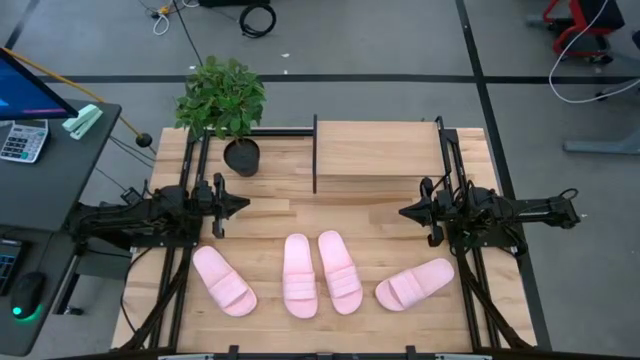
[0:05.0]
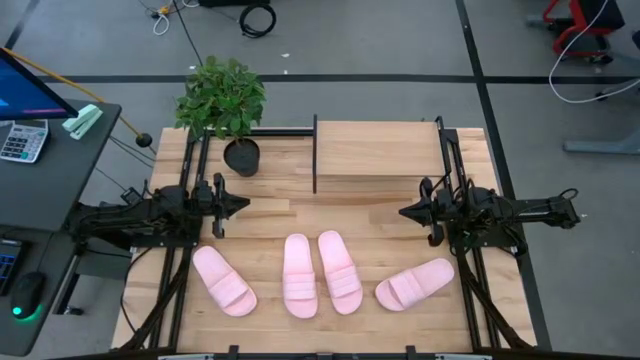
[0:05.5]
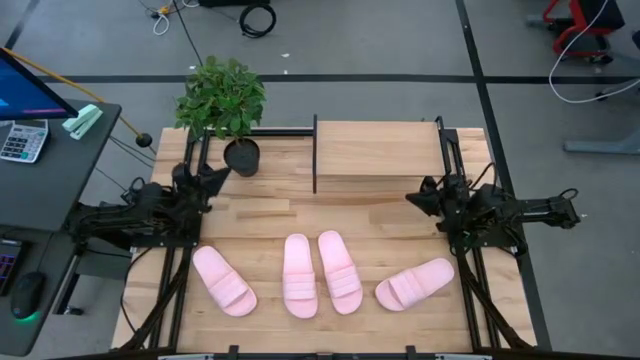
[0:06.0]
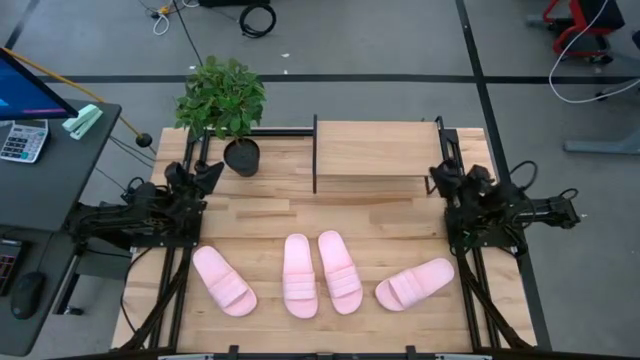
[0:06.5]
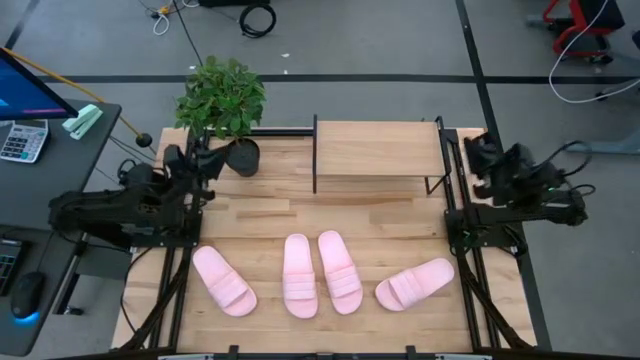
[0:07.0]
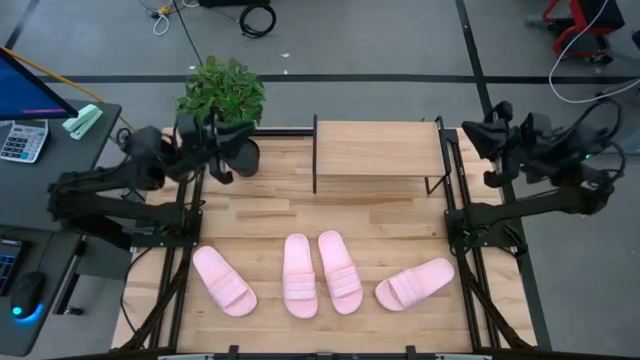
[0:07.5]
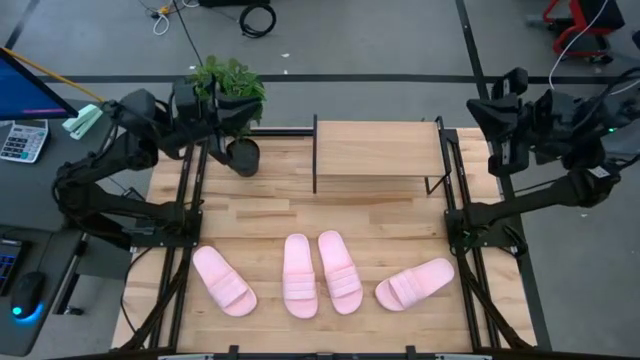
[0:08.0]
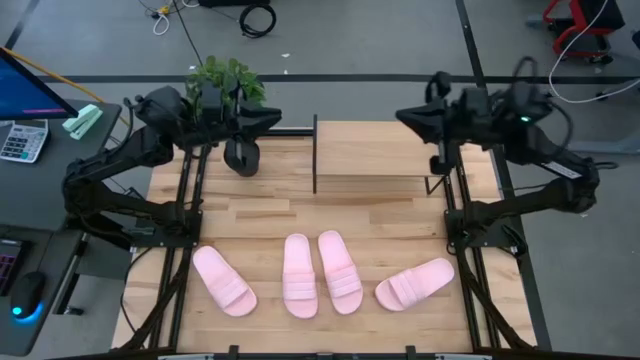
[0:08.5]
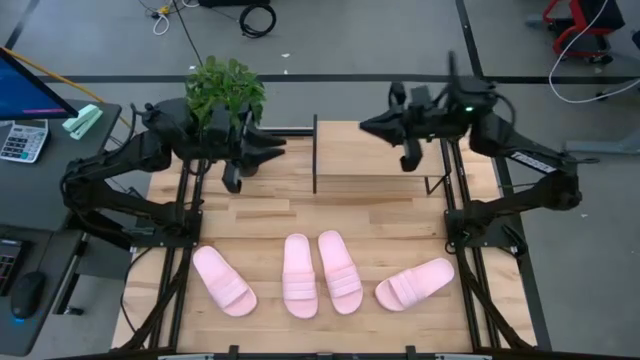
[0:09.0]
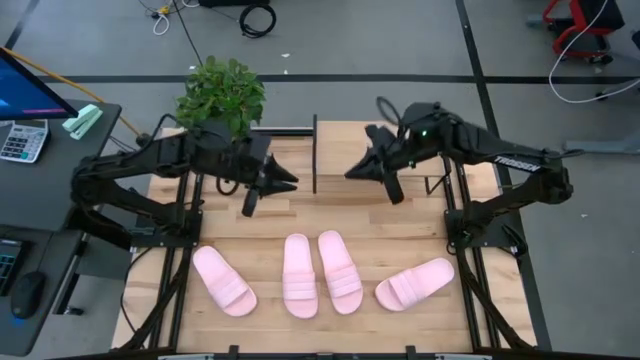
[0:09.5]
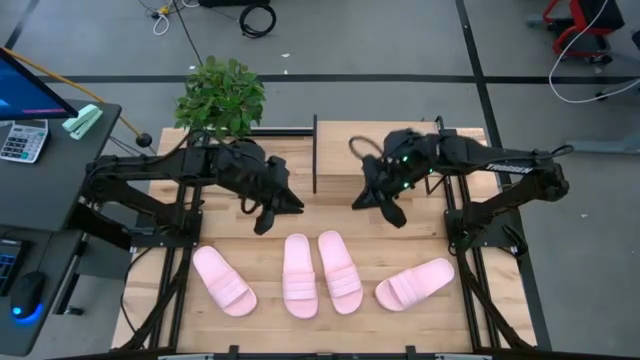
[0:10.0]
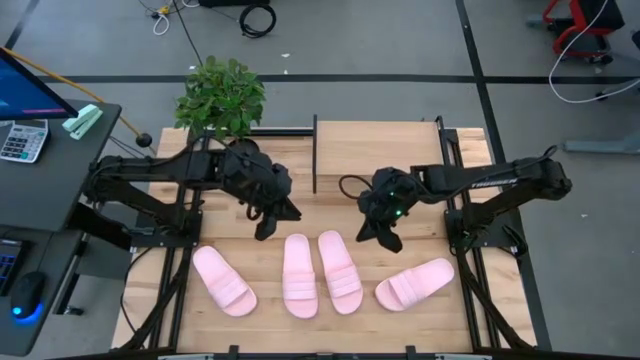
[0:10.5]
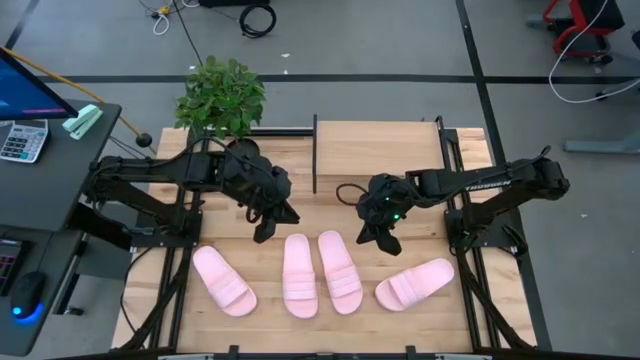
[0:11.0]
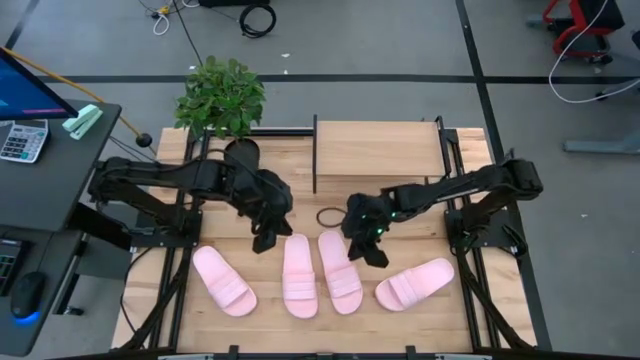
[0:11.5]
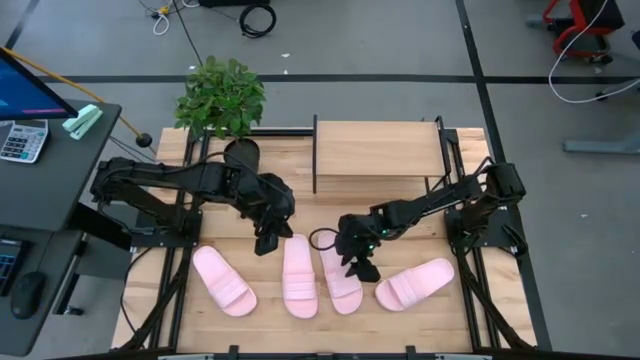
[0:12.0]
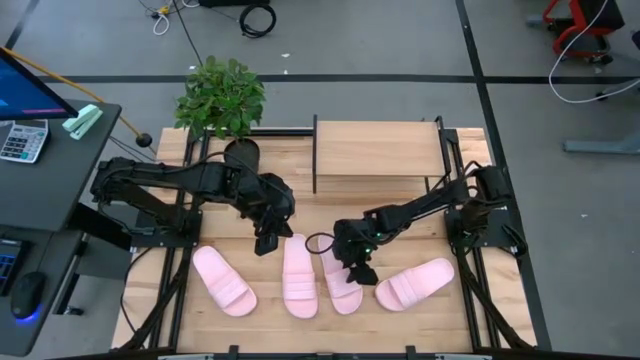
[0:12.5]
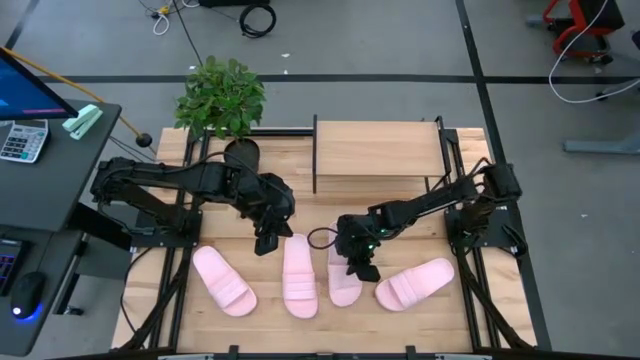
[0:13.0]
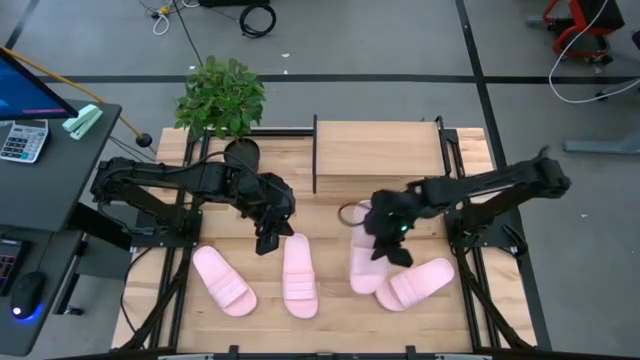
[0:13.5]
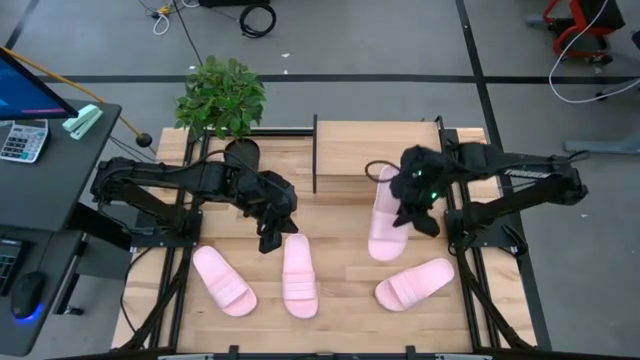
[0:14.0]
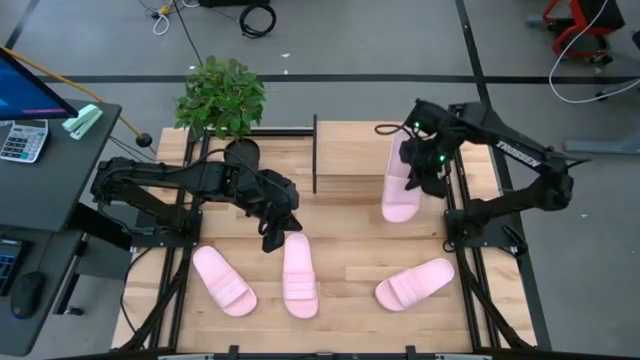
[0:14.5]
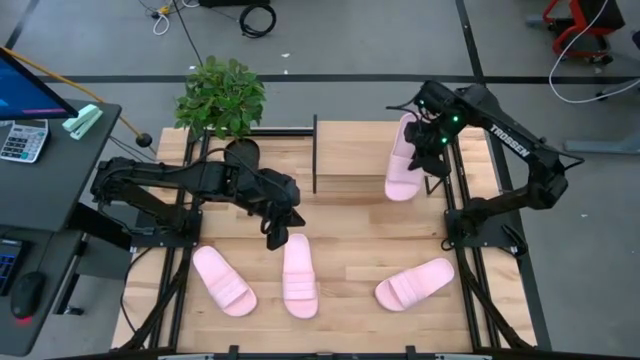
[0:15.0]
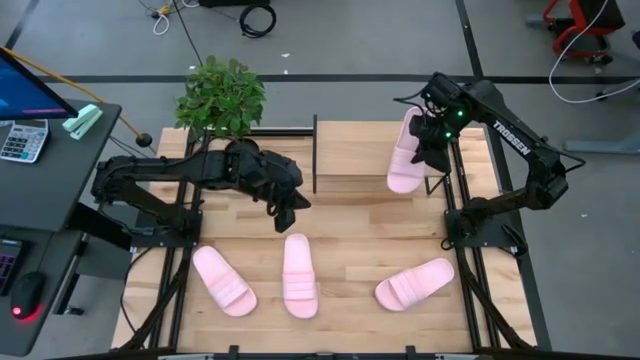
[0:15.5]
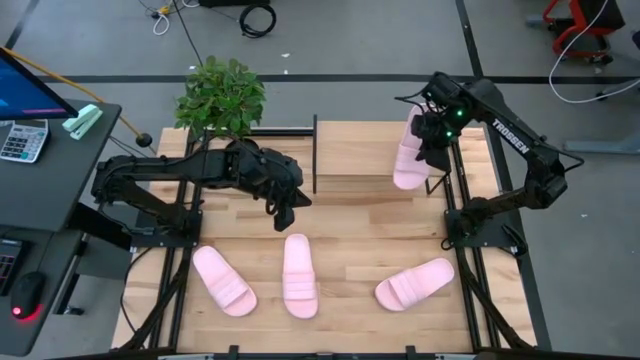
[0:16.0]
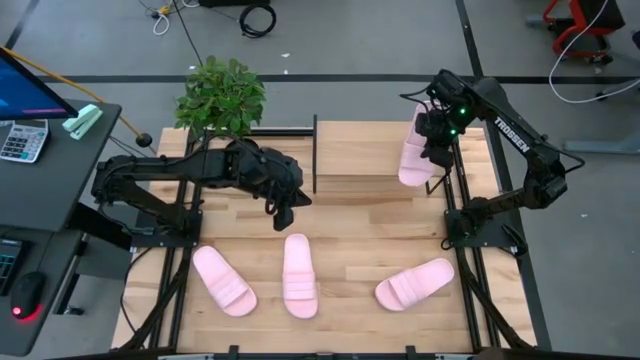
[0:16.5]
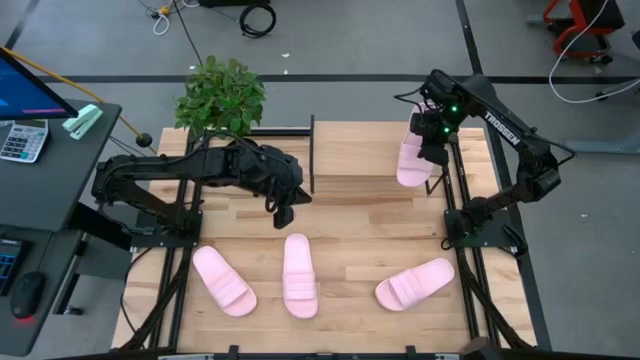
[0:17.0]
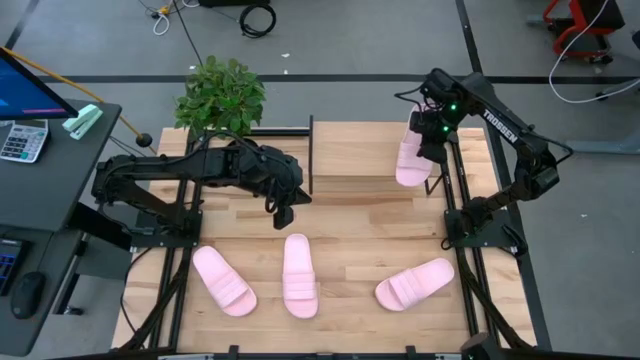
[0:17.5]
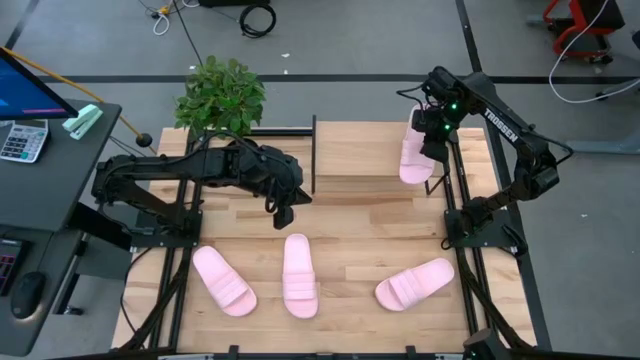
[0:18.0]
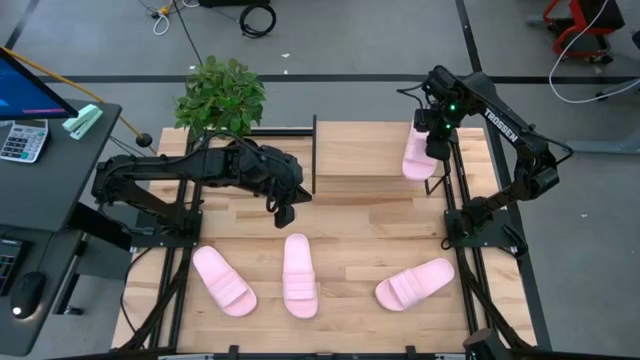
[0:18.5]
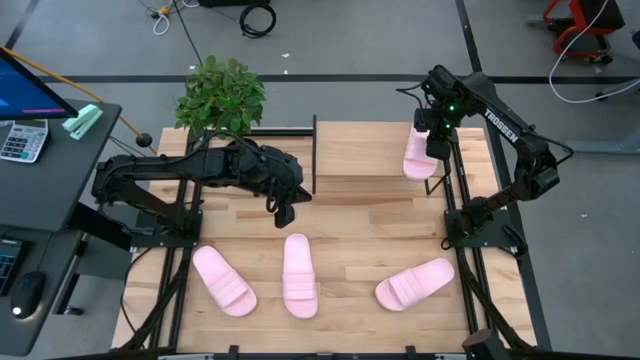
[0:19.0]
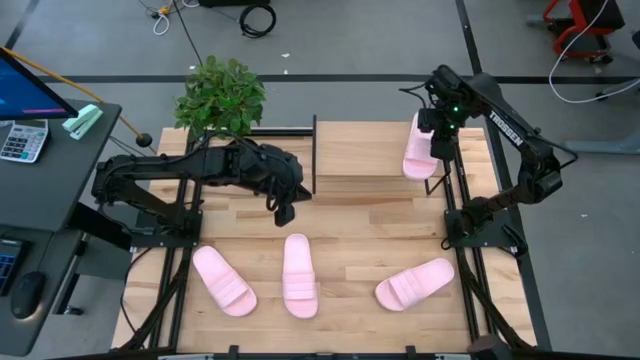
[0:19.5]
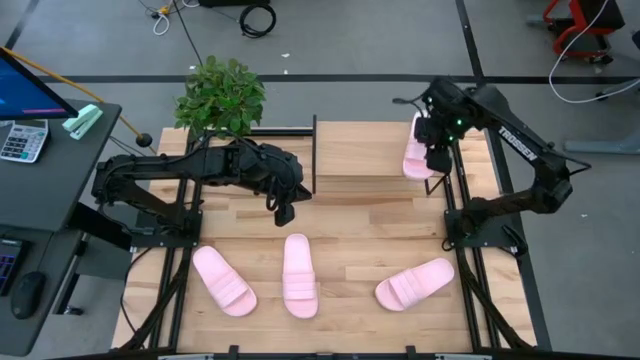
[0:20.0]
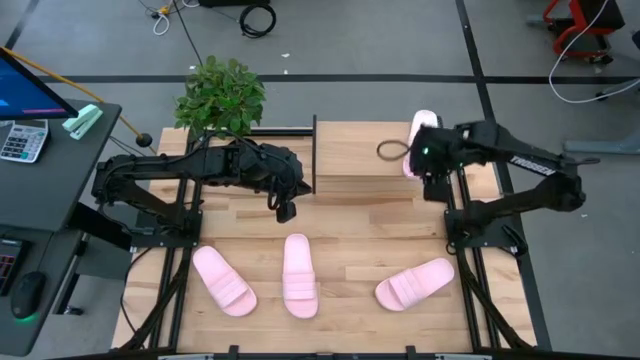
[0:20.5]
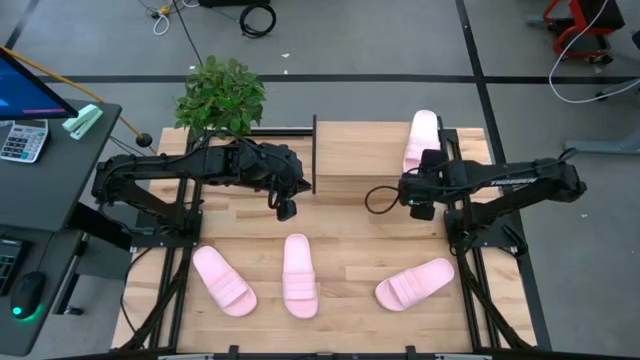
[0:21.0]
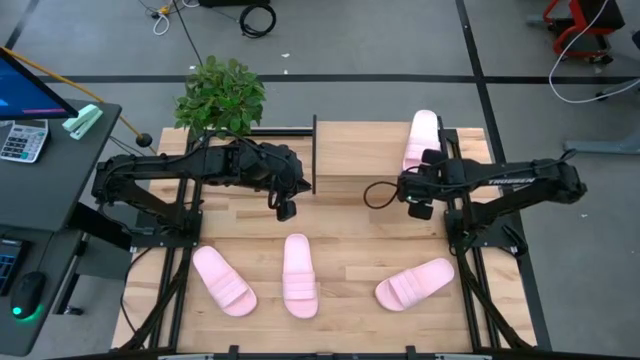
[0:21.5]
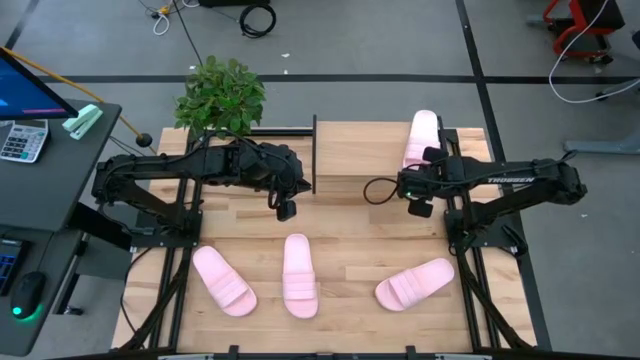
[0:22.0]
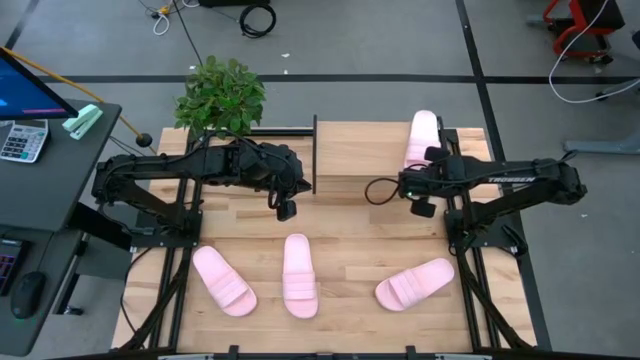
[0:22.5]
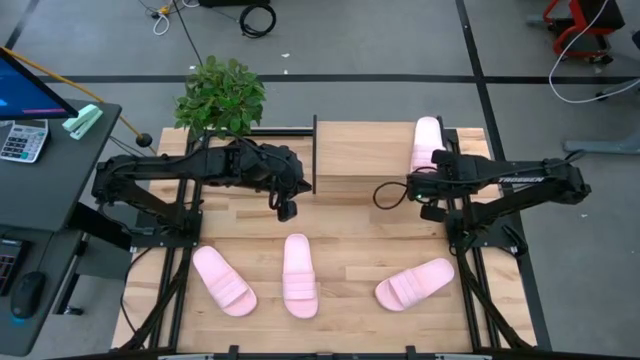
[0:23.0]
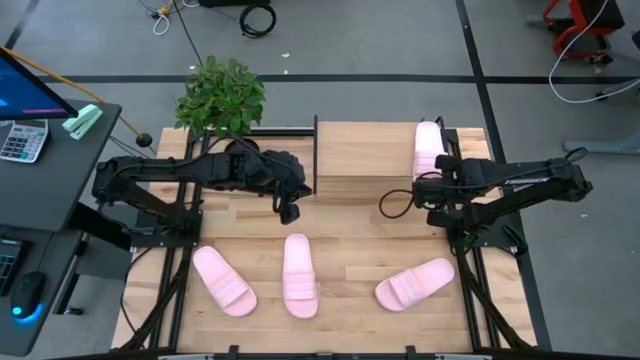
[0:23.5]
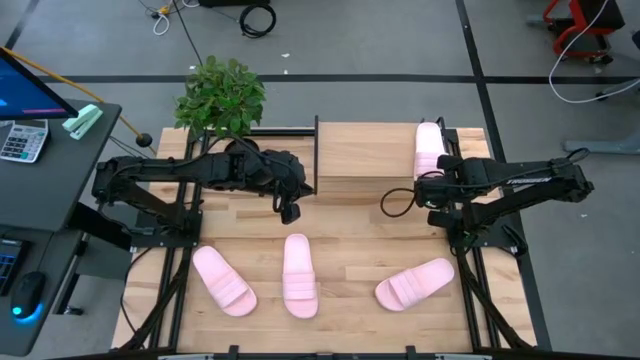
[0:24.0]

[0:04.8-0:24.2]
Task: Pick and place slides into the shelf
Put the middle right pink slide on the shelf
